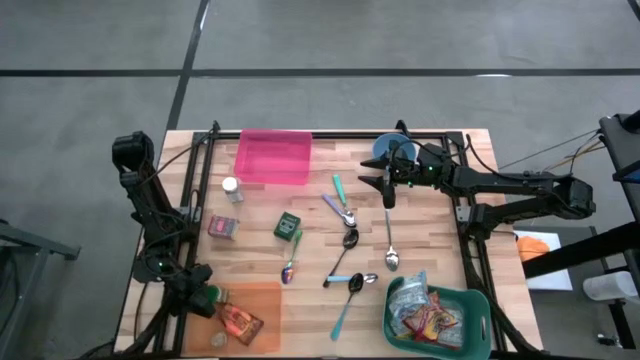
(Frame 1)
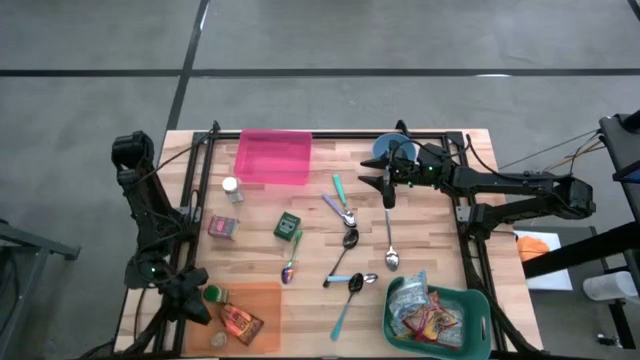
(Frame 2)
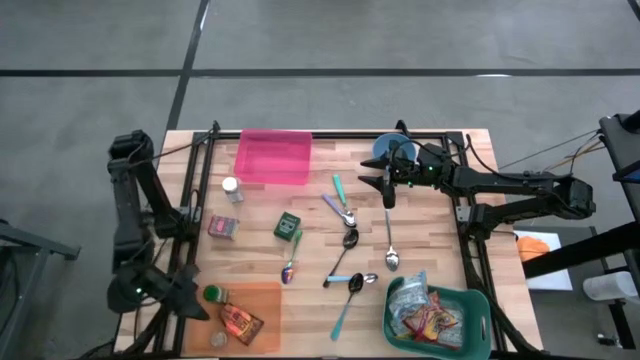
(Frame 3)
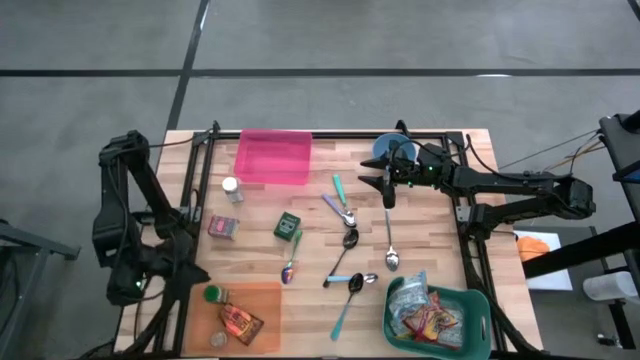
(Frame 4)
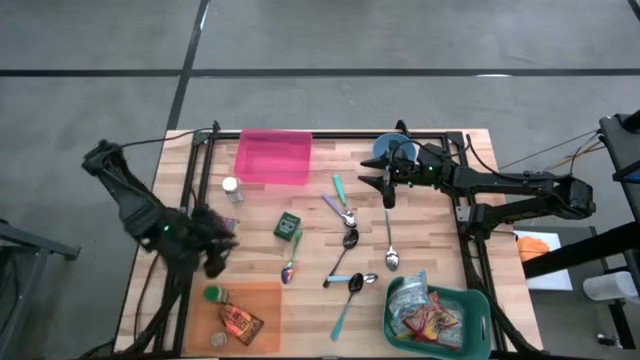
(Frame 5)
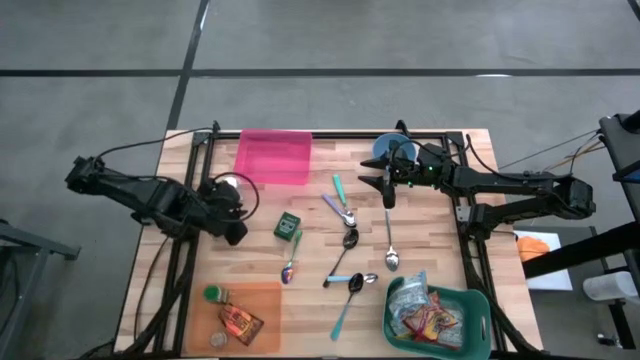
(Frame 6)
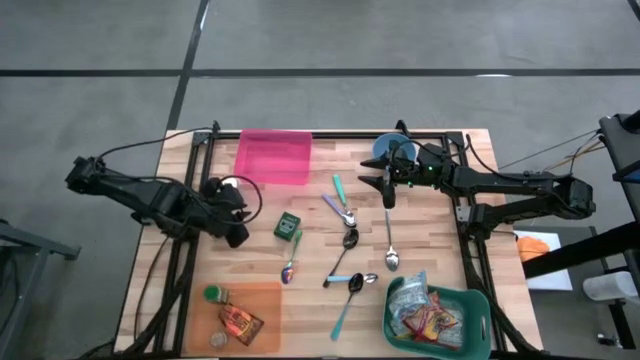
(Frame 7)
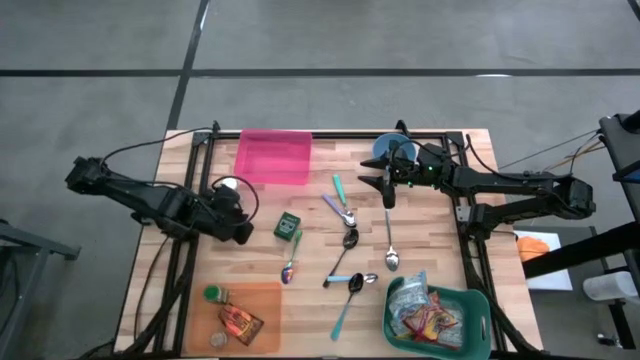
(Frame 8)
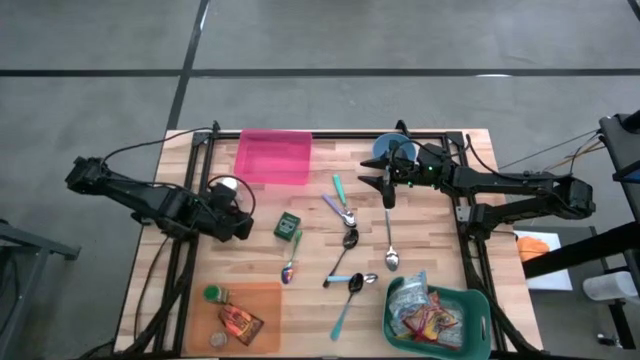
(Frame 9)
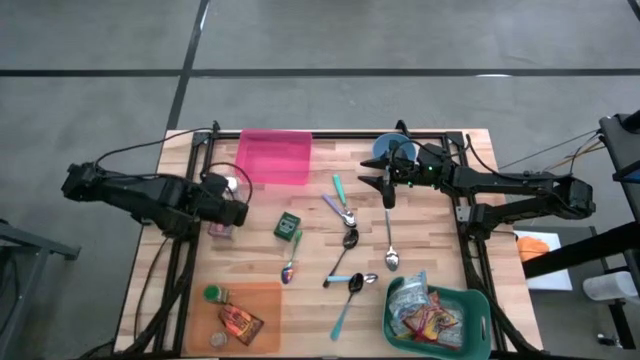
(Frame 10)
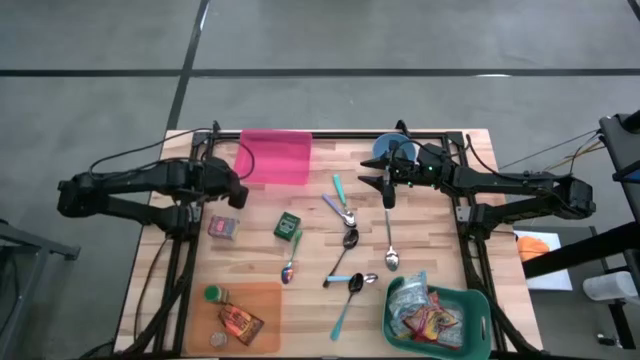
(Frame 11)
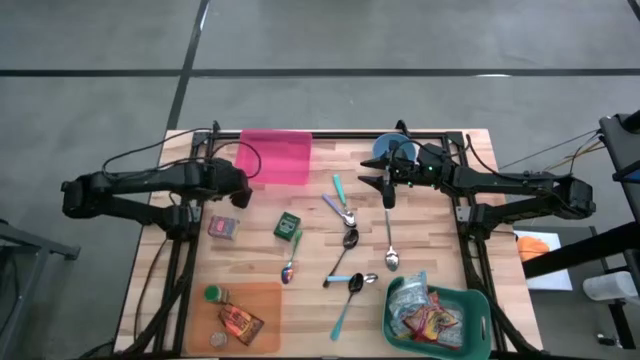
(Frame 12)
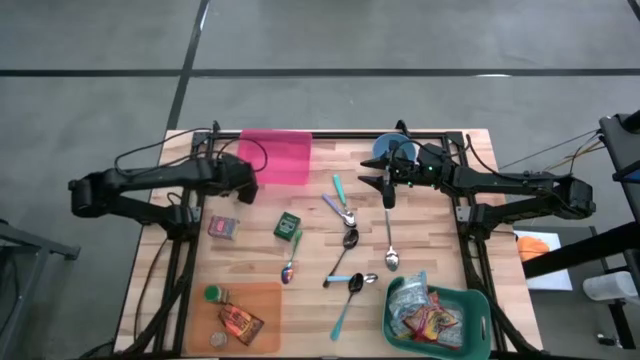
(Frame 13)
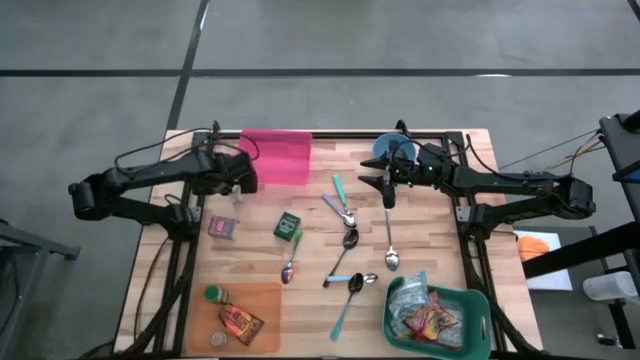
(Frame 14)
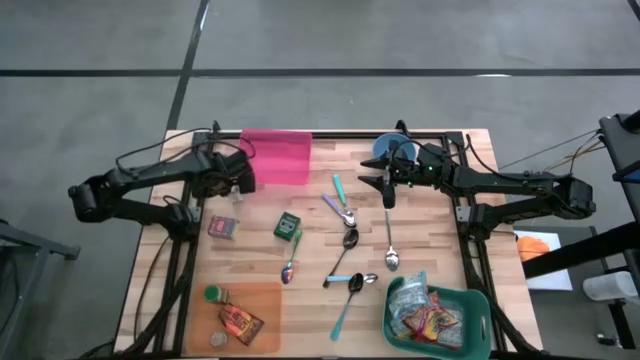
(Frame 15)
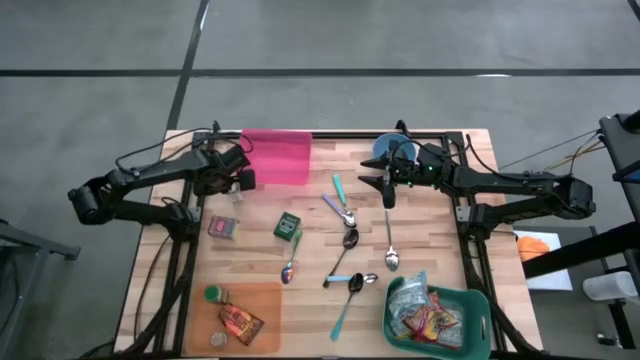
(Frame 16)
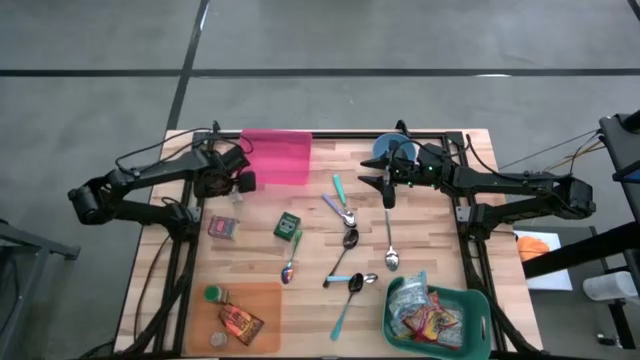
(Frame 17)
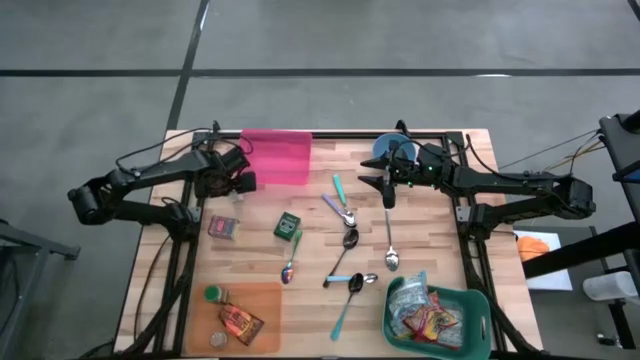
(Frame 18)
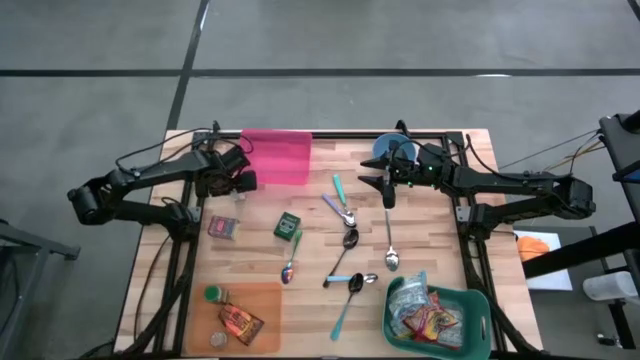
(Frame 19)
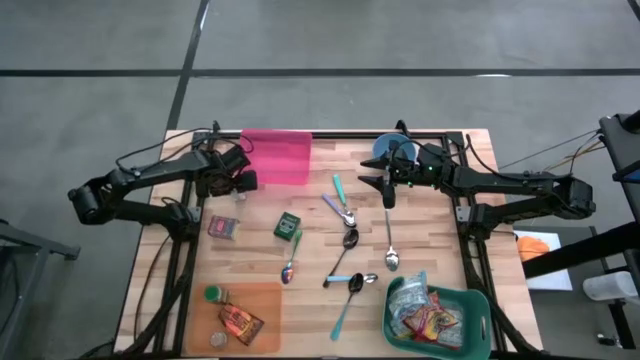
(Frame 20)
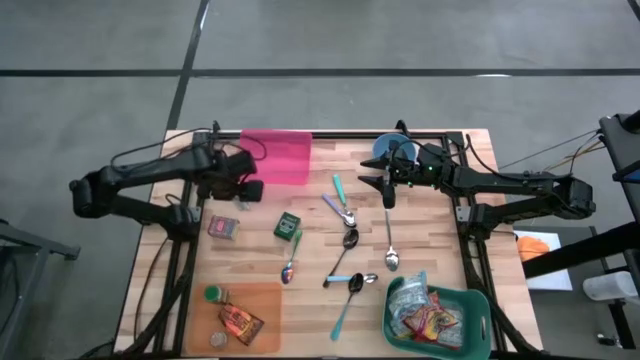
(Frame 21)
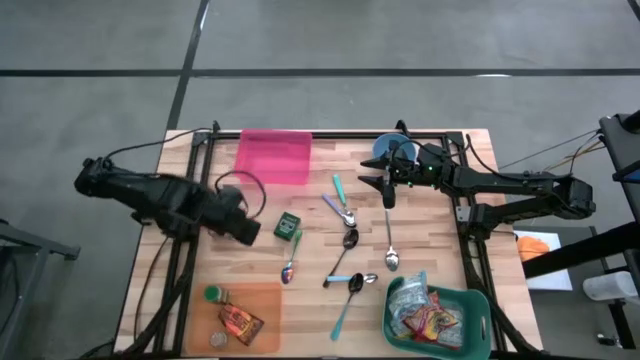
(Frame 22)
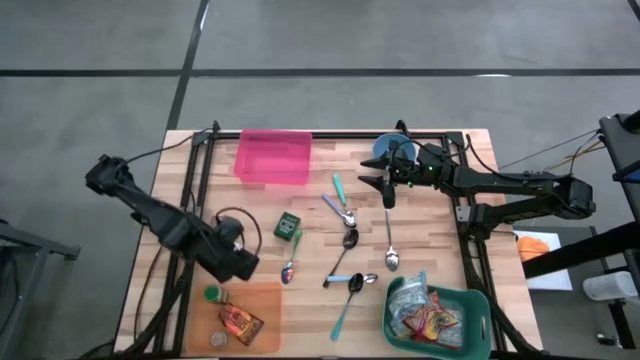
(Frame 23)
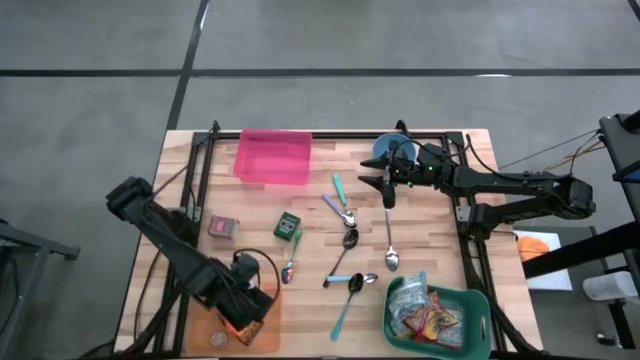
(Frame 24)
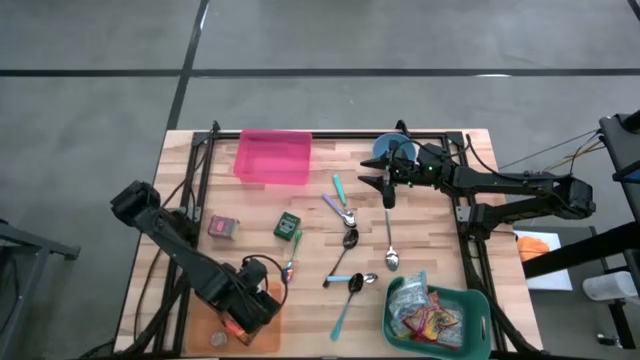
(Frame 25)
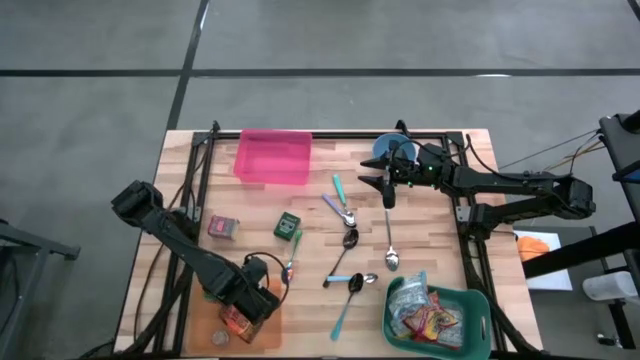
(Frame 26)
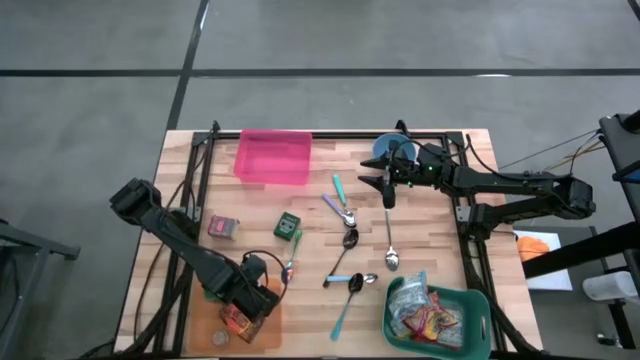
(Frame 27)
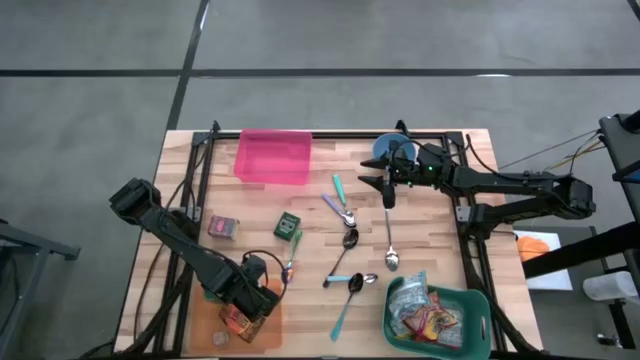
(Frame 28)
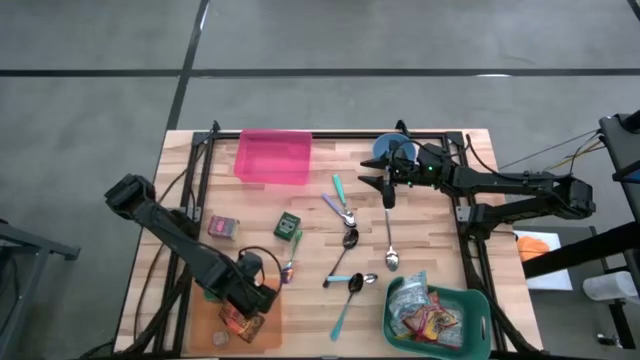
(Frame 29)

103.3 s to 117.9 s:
Put the white seasoning bottle into the orange bin

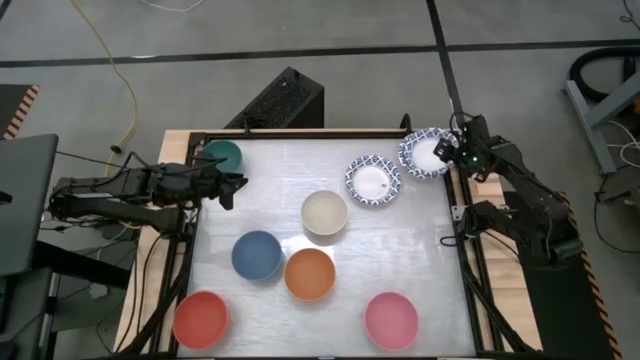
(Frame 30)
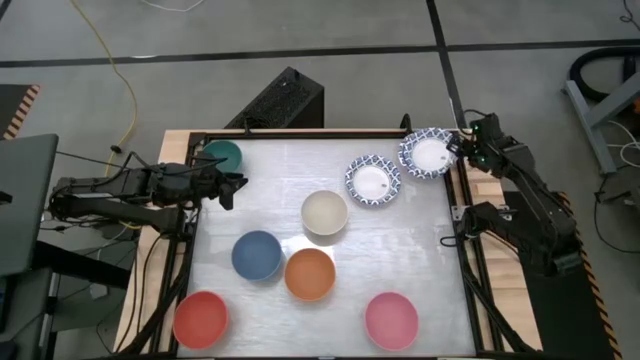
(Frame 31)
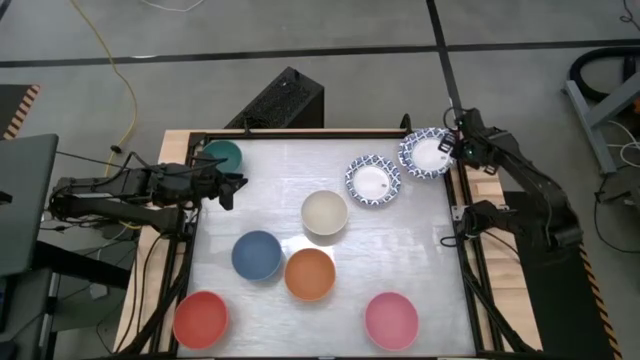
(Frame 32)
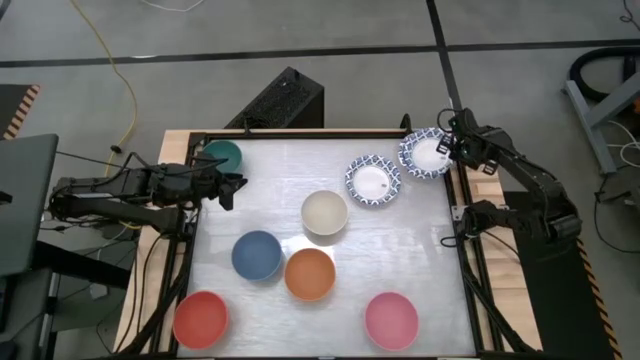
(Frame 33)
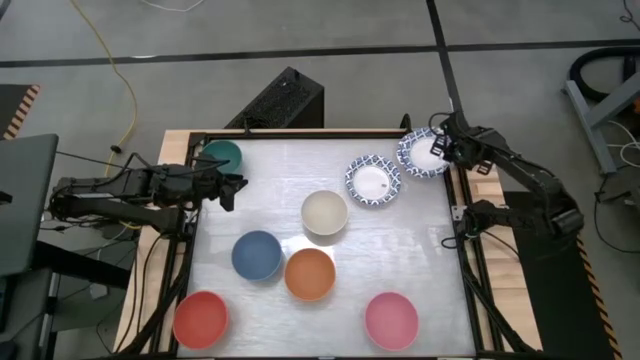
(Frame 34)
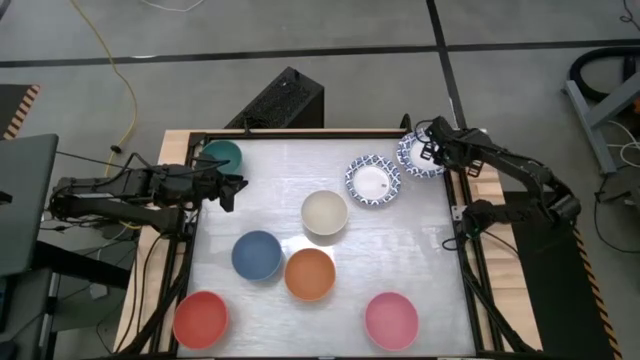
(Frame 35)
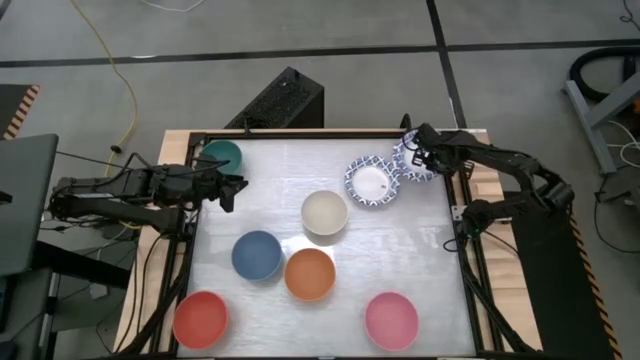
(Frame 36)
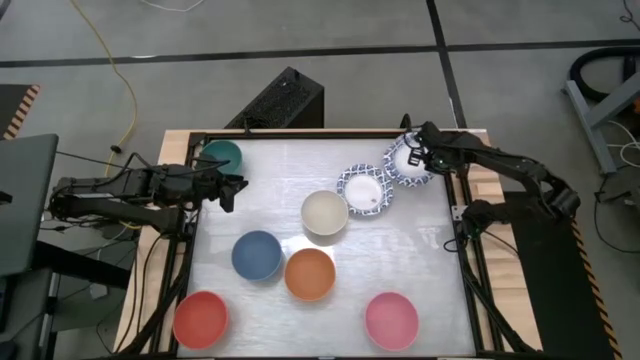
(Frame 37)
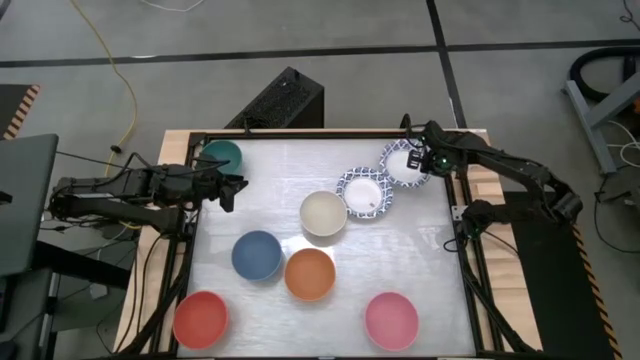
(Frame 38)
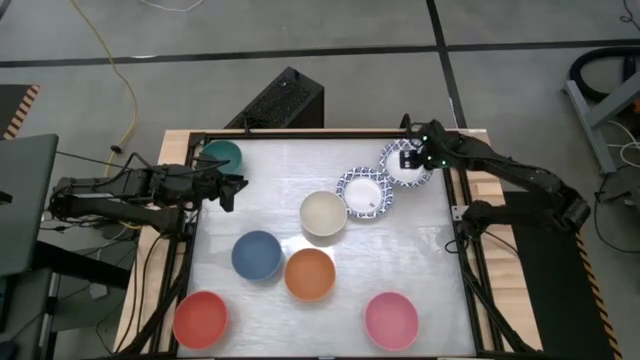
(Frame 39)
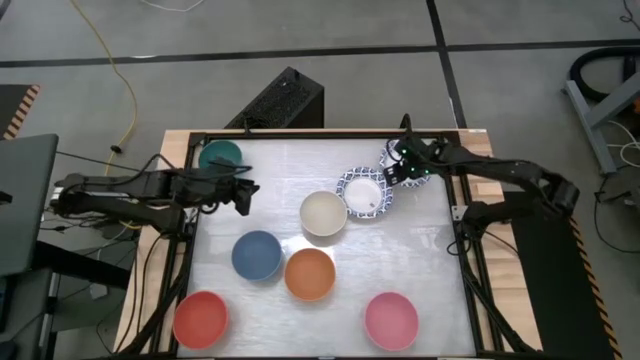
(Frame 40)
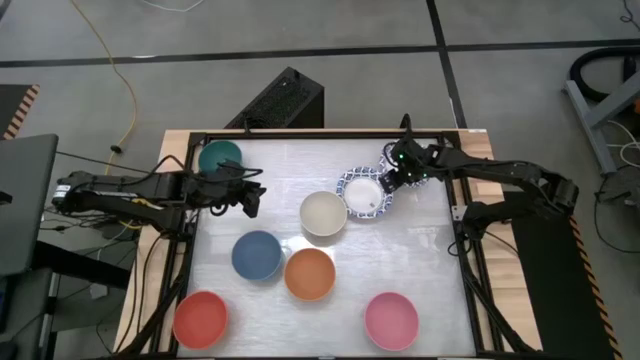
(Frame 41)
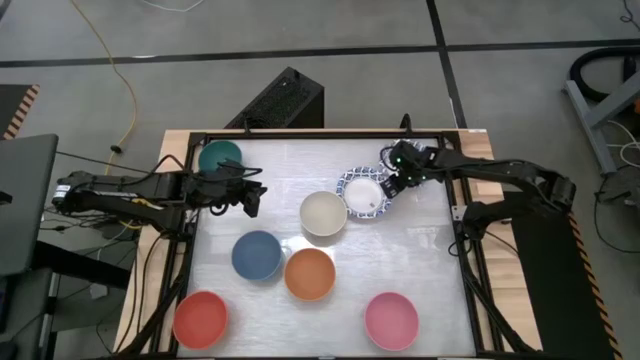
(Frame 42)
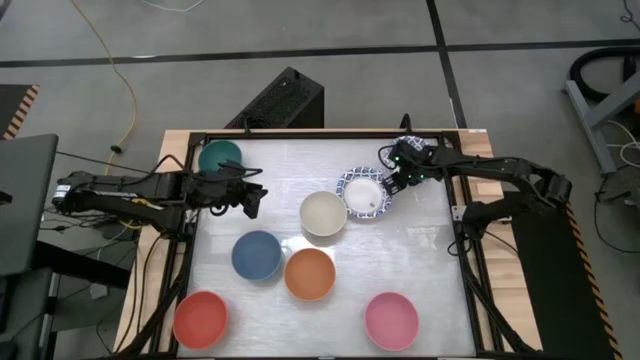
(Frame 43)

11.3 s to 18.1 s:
Adjust the blue patterned bowl
